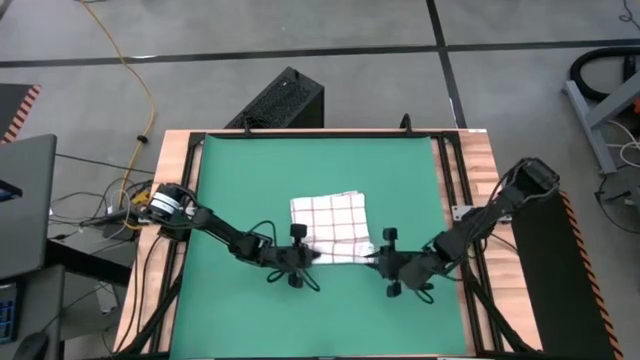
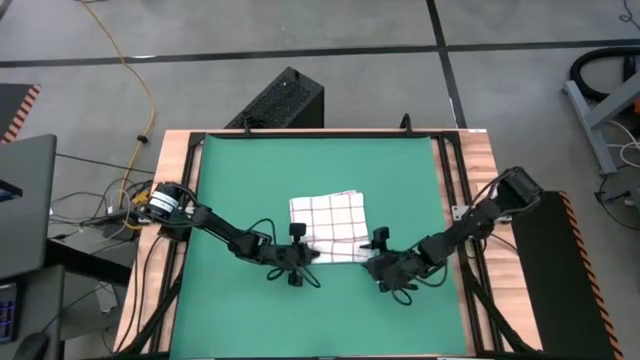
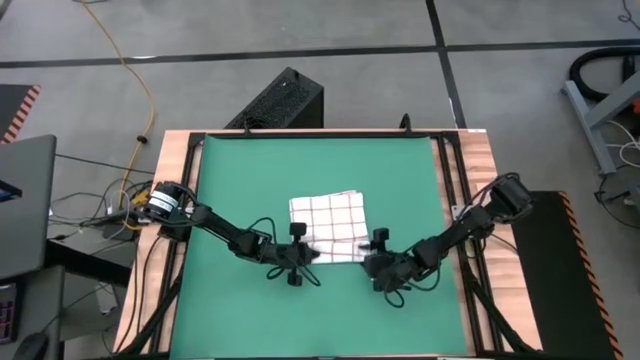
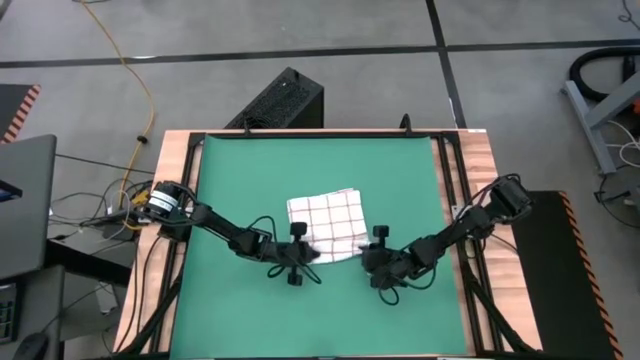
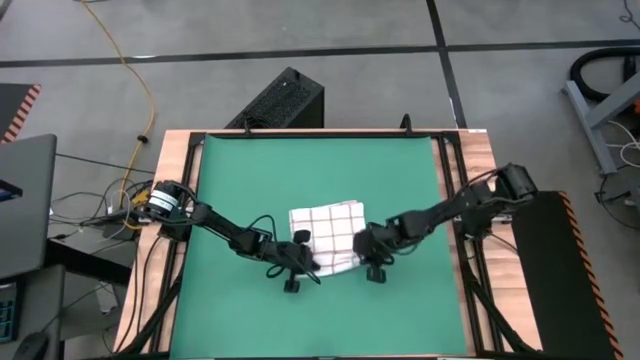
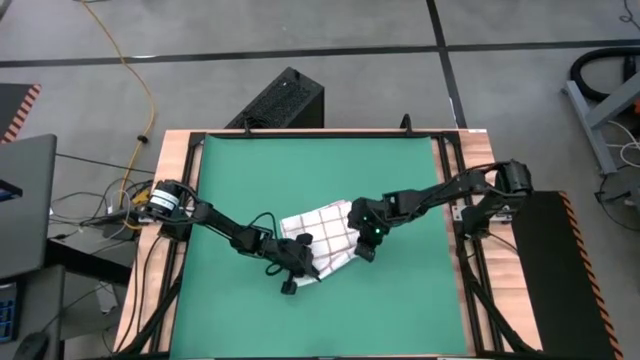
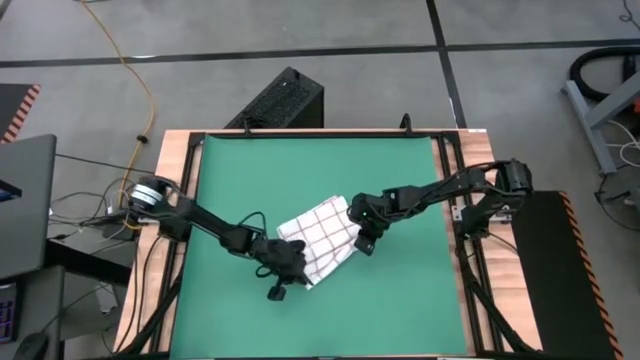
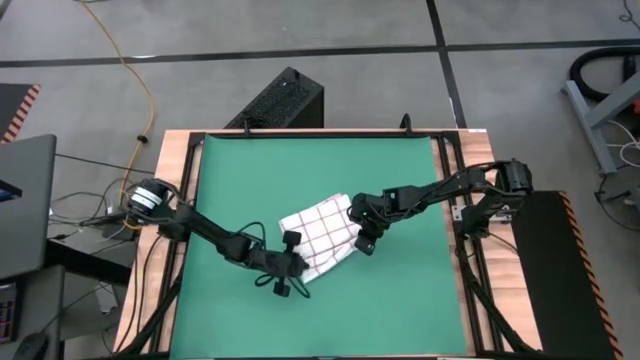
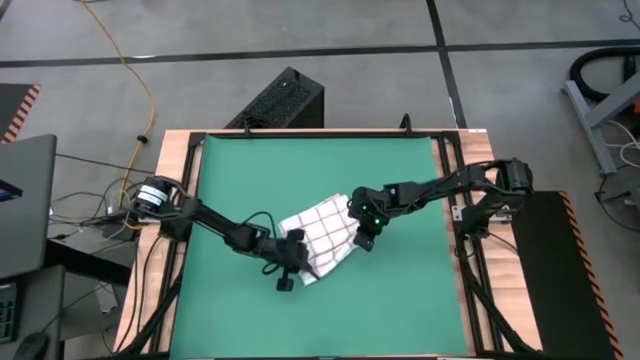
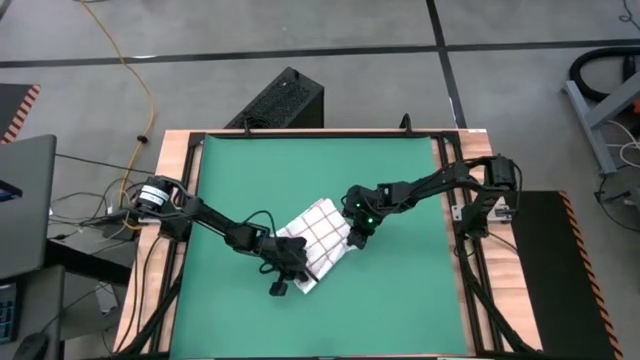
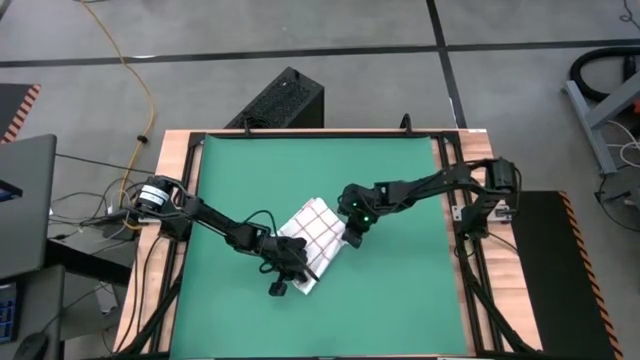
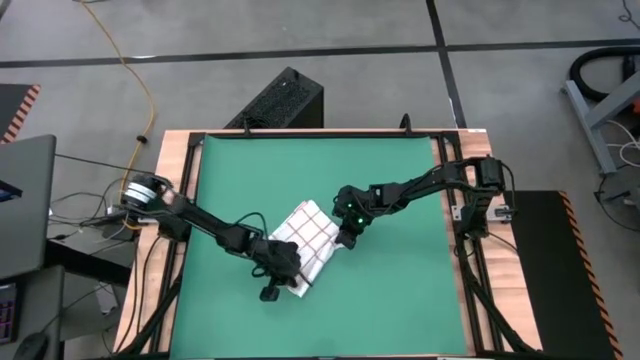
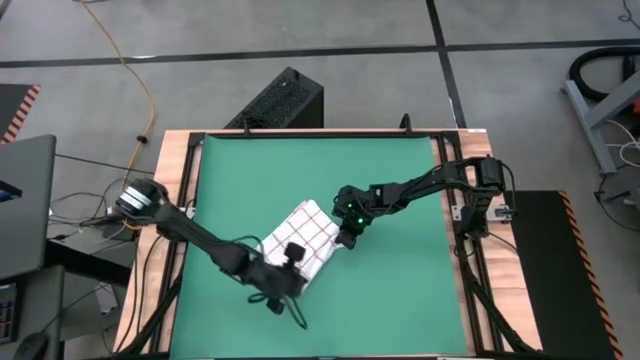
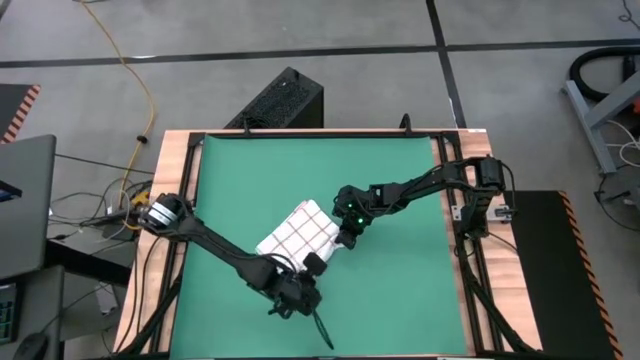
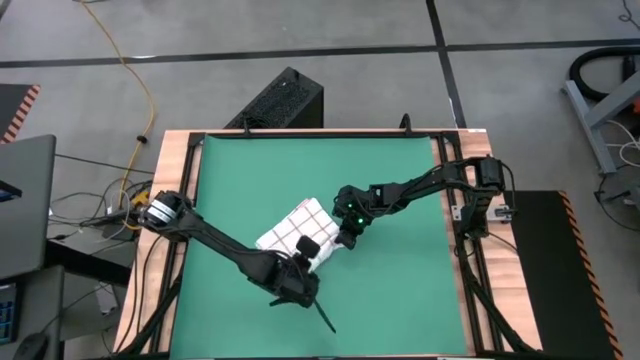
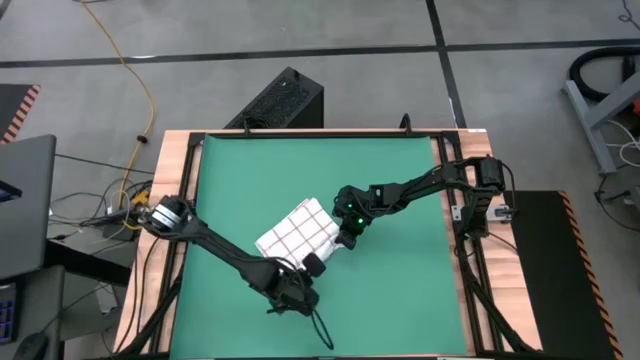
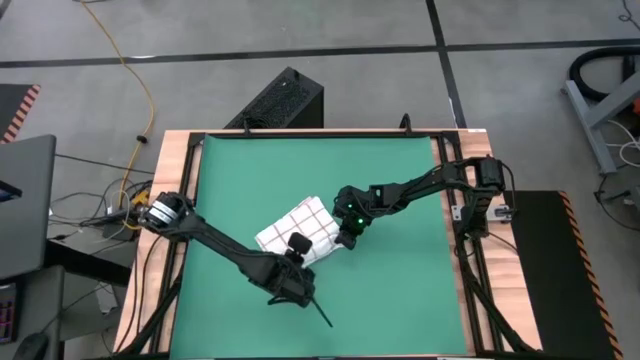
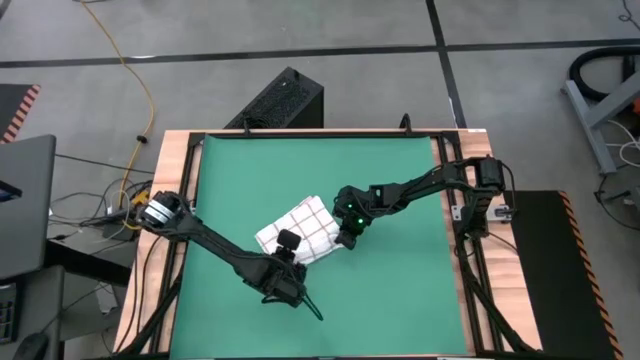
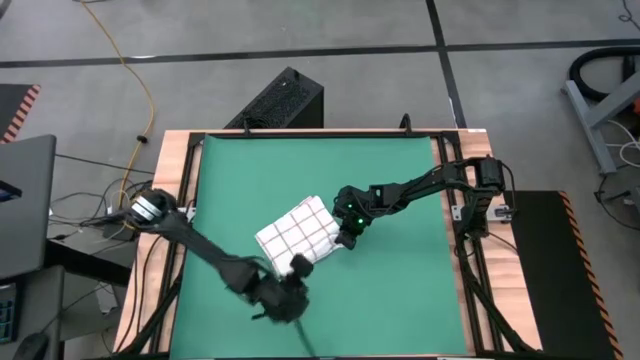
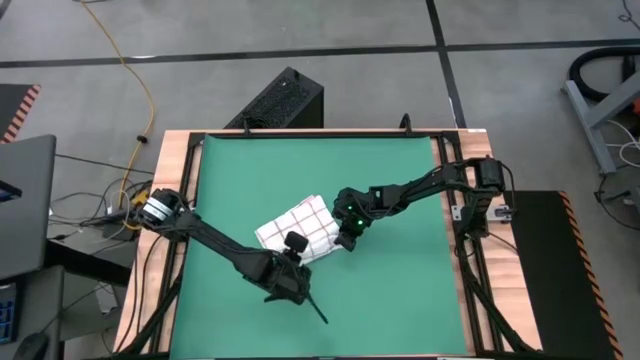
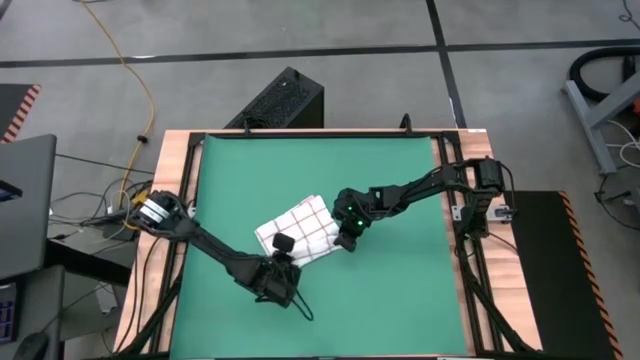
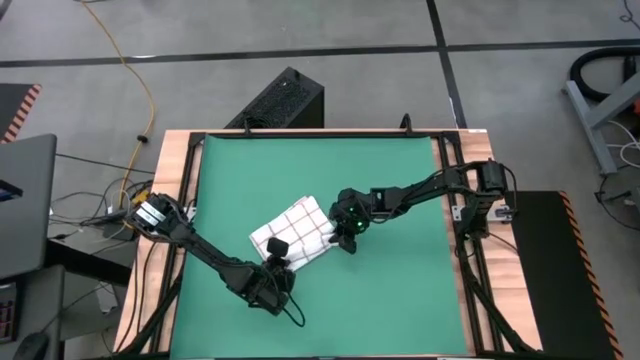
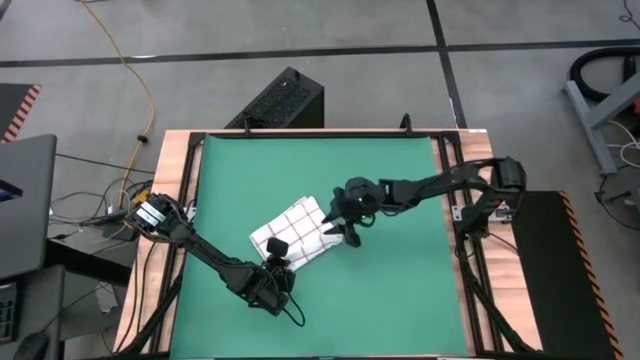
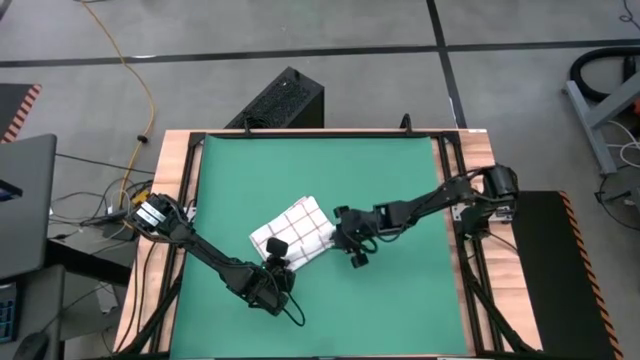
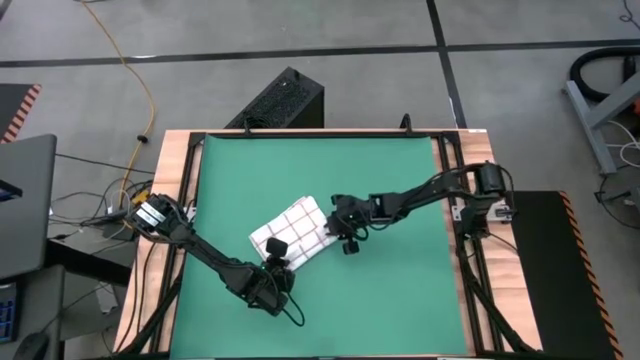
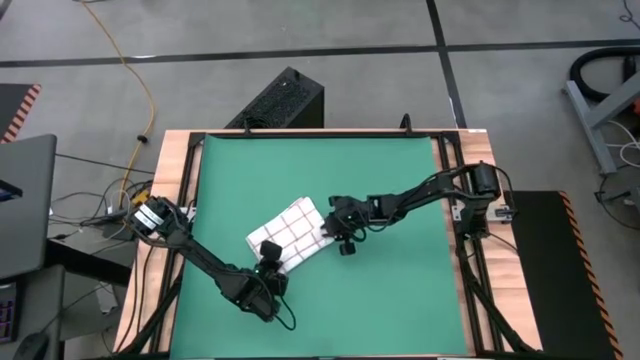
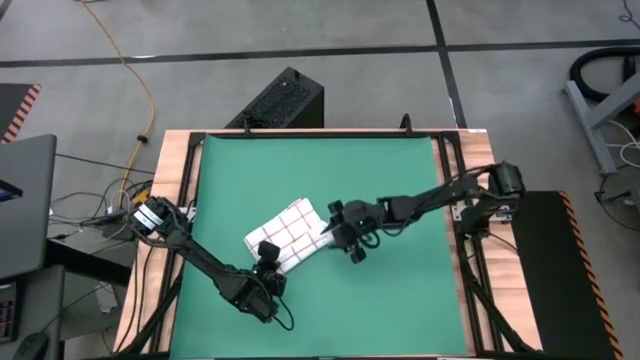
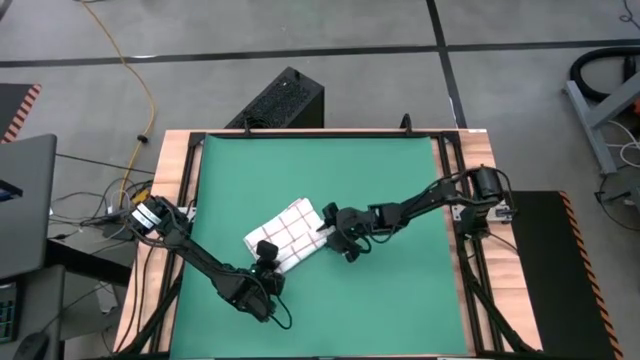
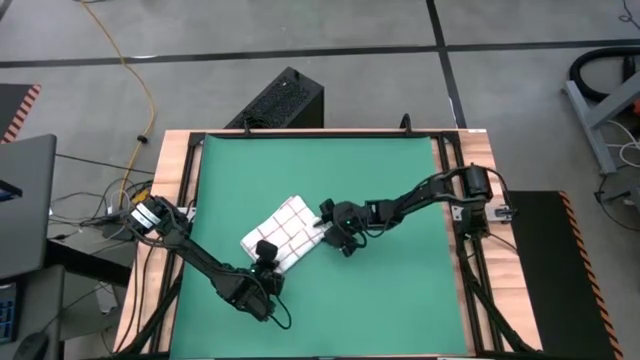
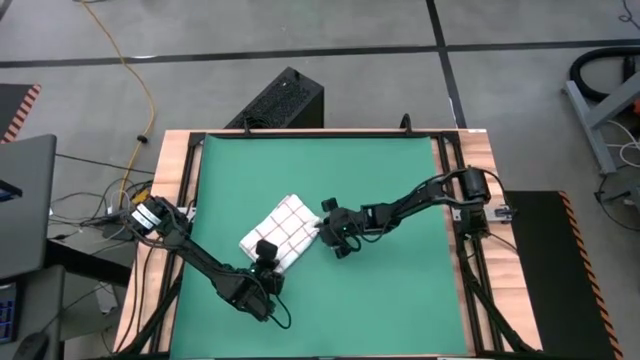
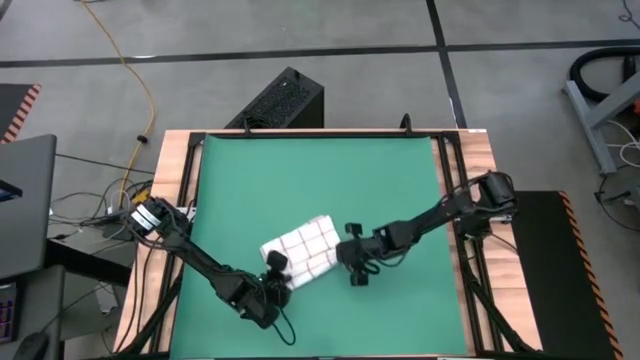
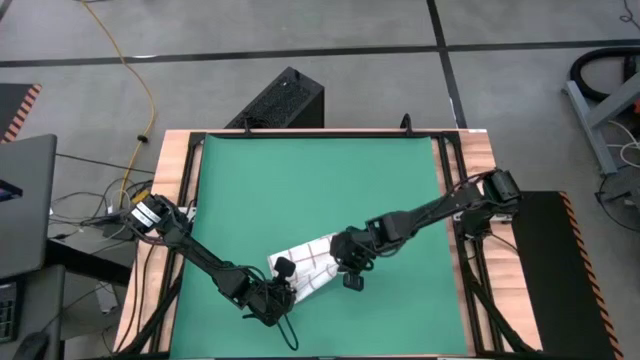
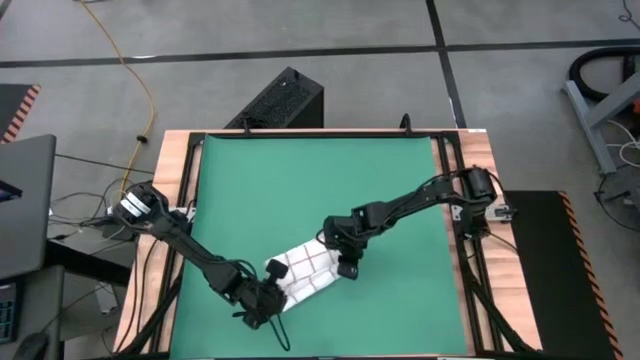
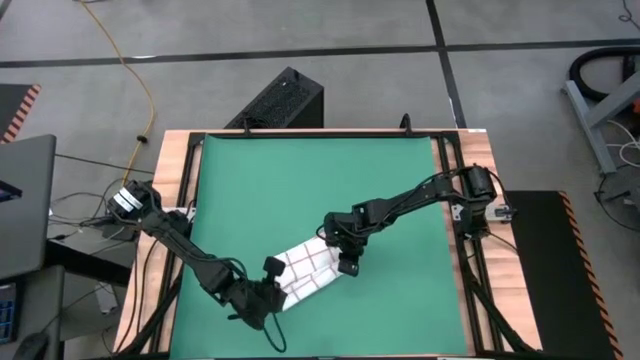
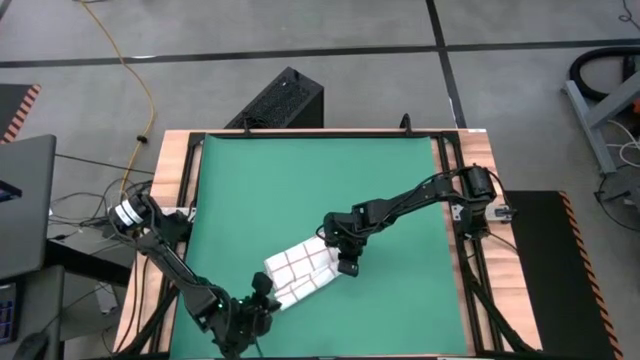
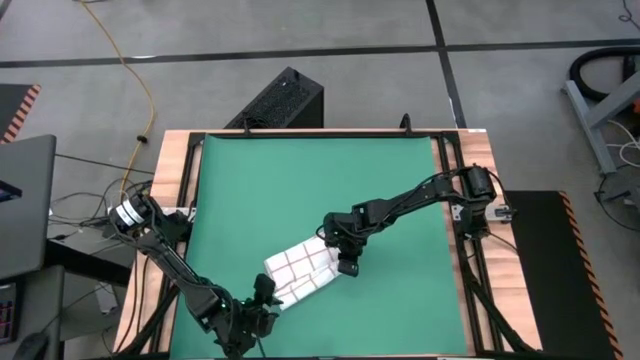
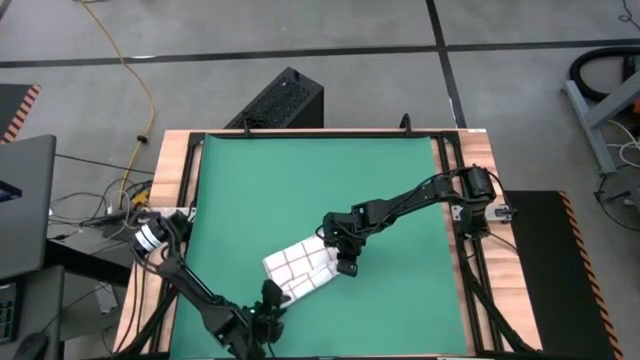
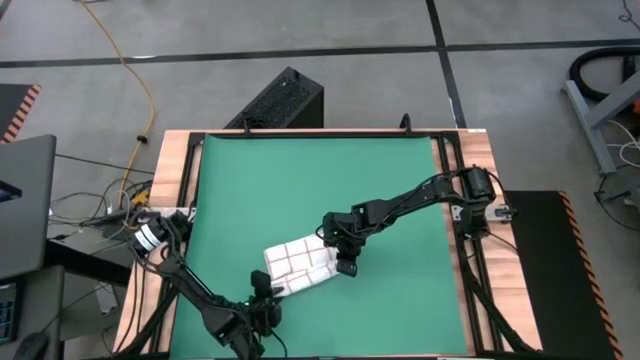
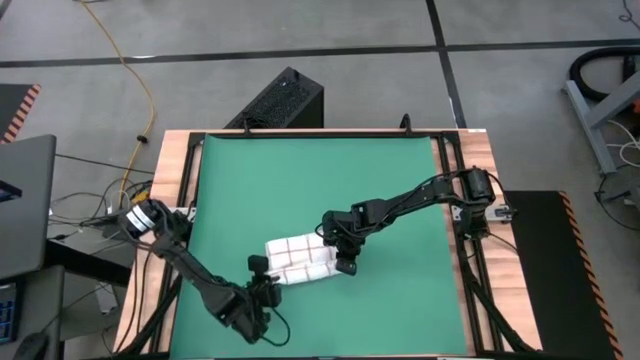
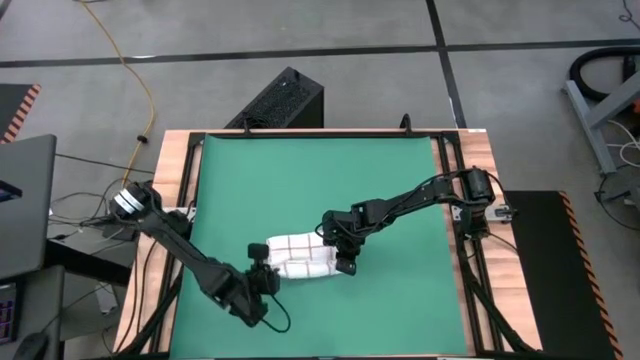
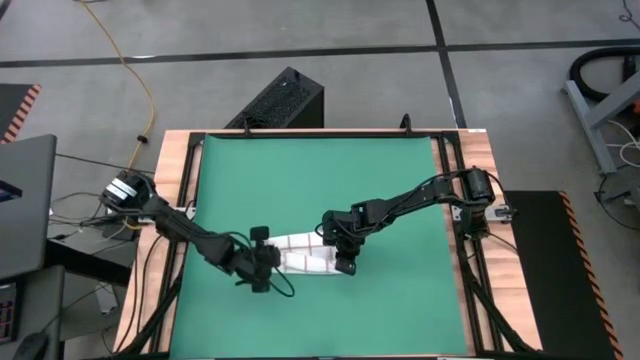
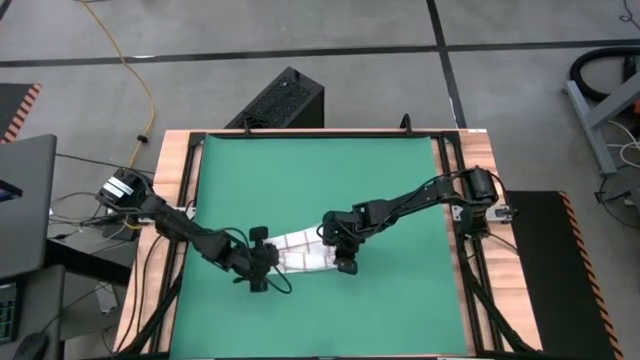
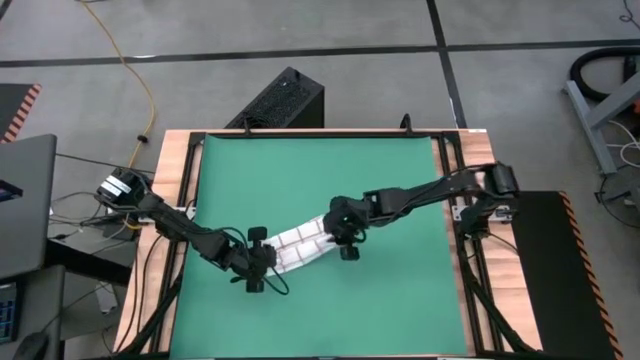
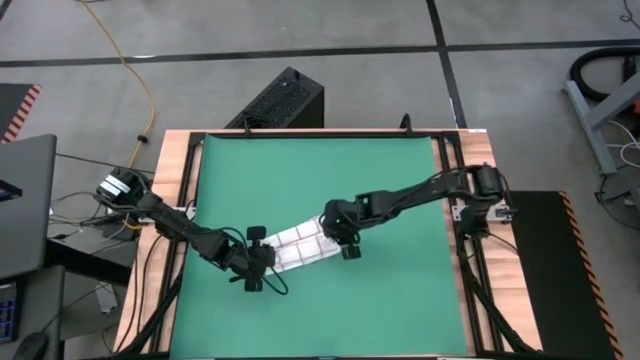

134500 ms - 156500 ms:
Task: Roll towel into tight, uniform cylinder
Roll the kitchen towel on the table
